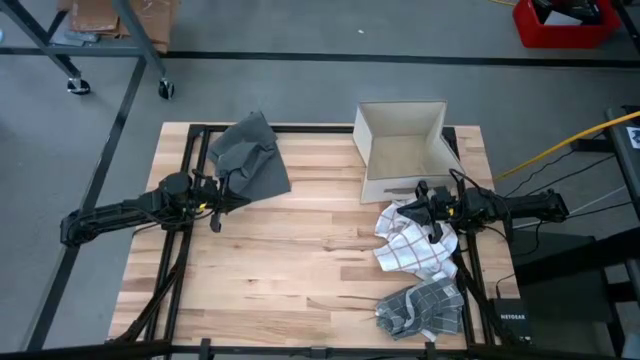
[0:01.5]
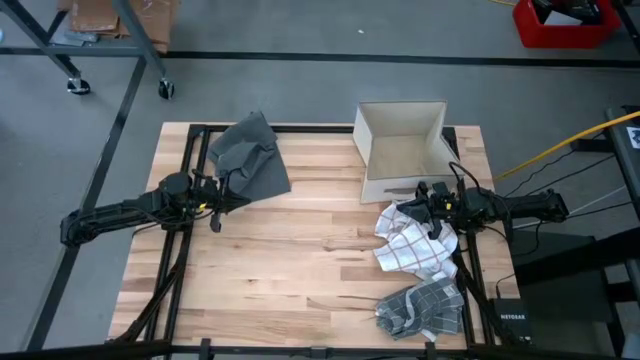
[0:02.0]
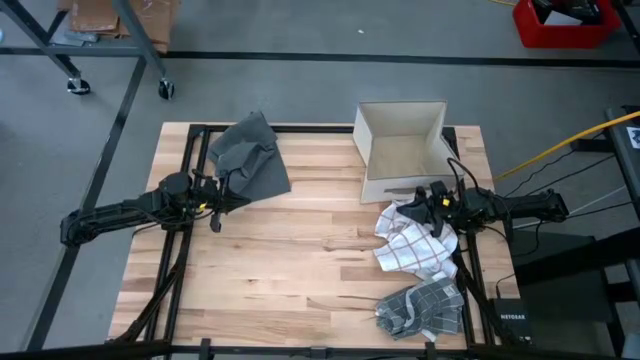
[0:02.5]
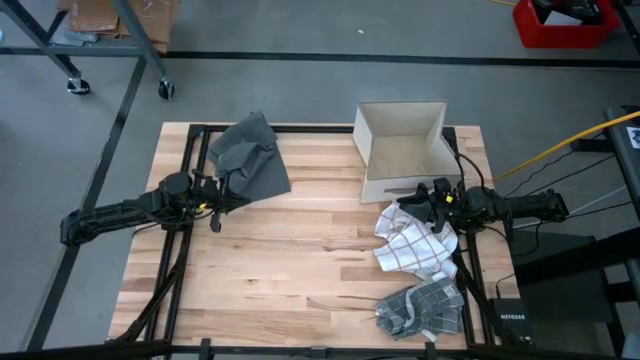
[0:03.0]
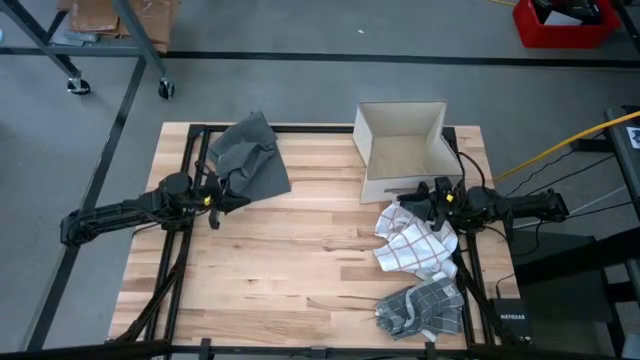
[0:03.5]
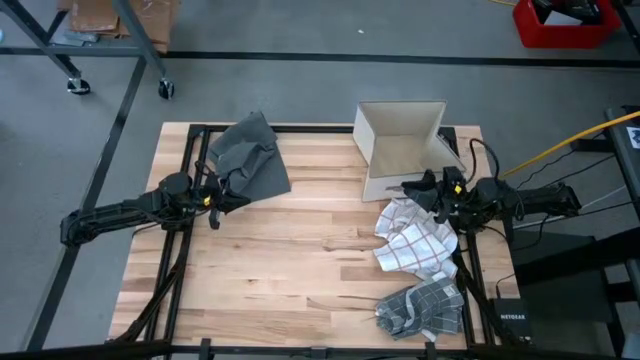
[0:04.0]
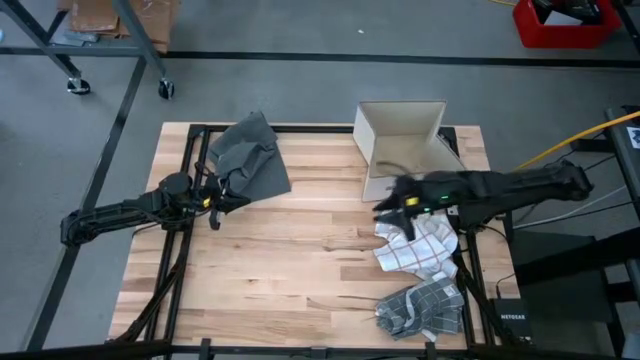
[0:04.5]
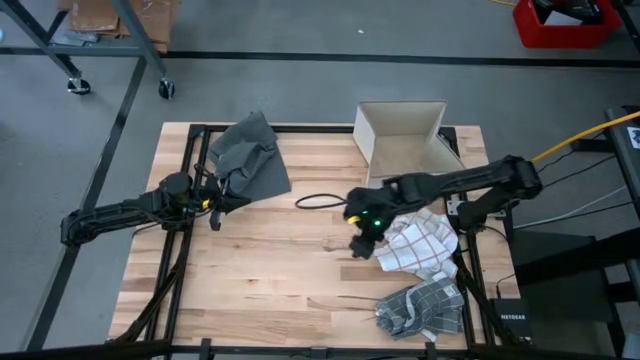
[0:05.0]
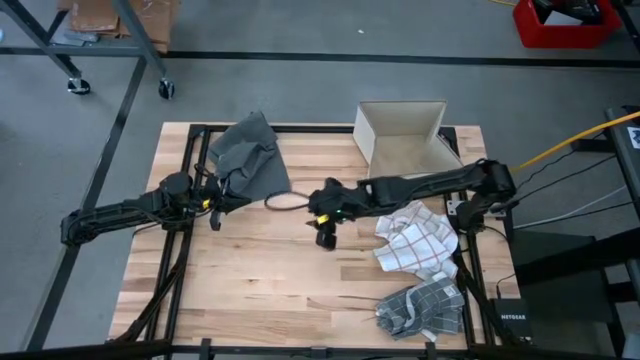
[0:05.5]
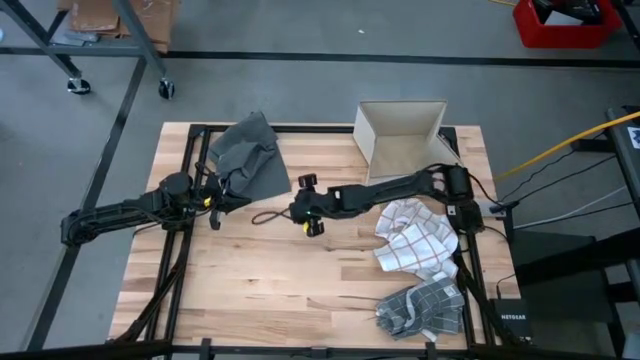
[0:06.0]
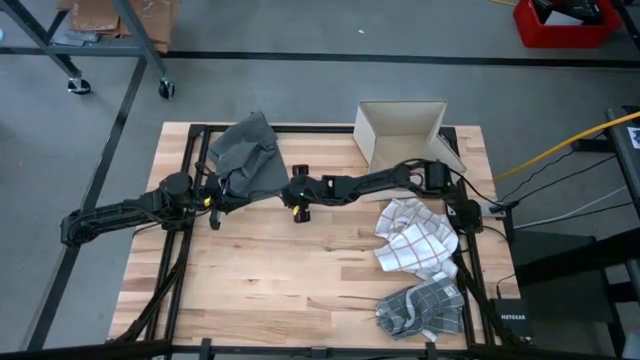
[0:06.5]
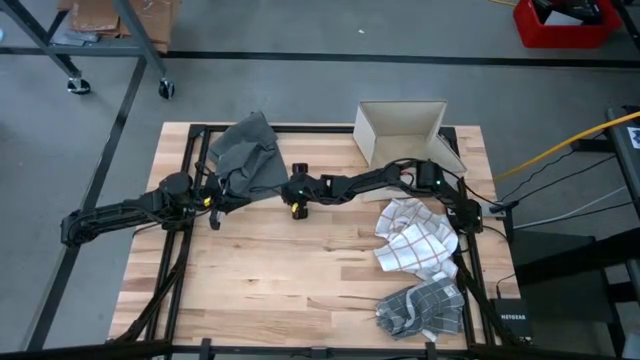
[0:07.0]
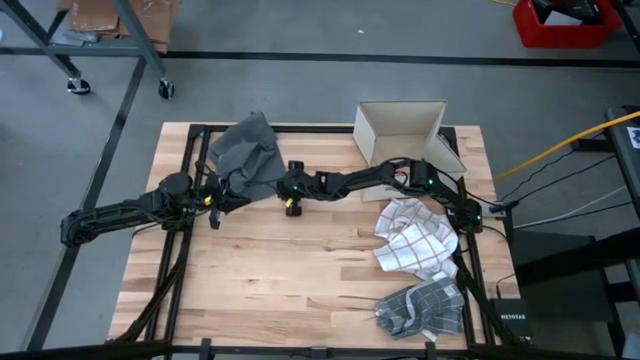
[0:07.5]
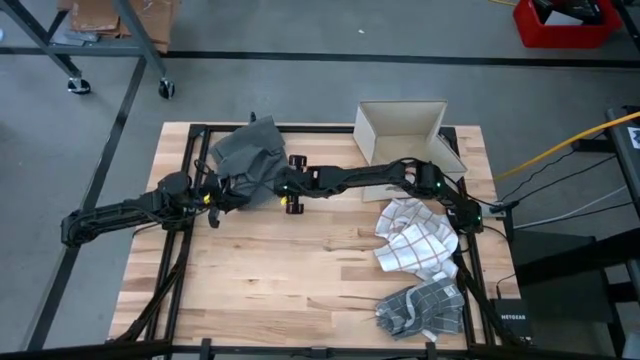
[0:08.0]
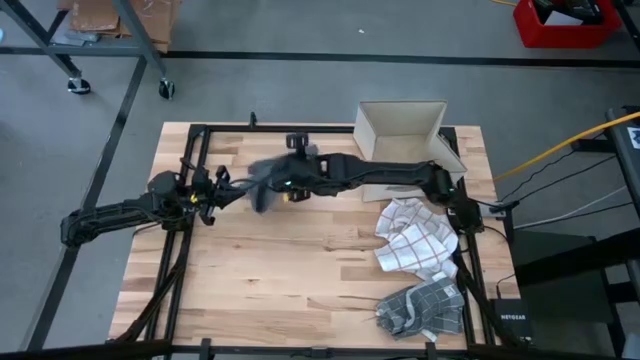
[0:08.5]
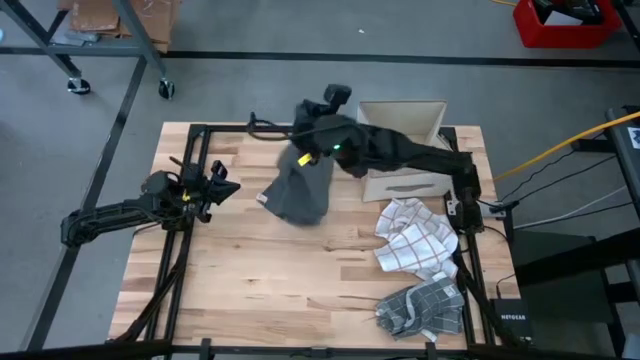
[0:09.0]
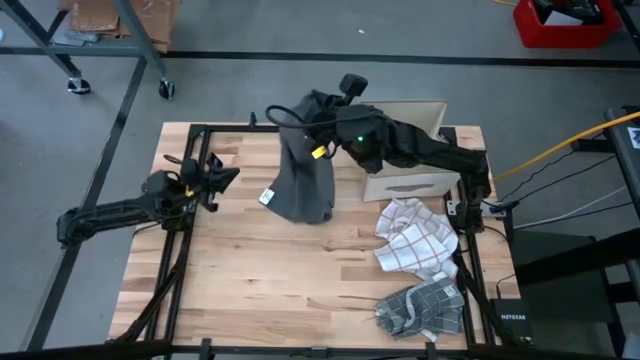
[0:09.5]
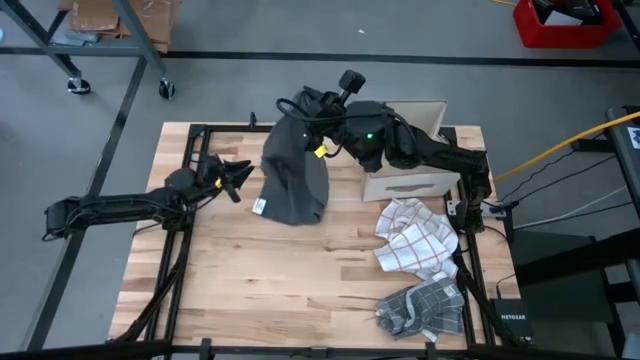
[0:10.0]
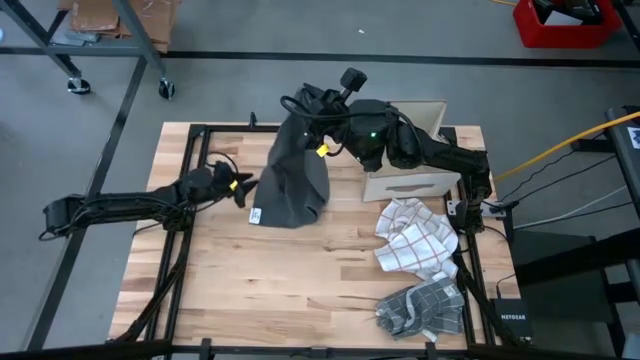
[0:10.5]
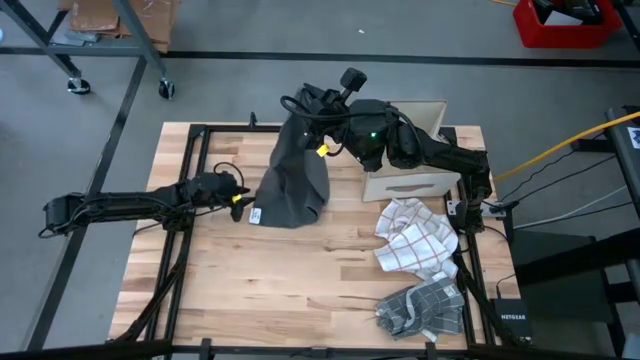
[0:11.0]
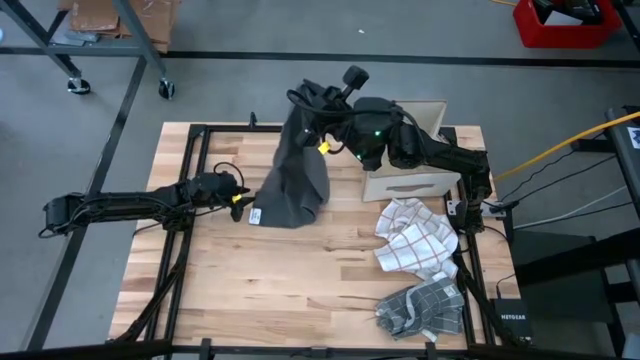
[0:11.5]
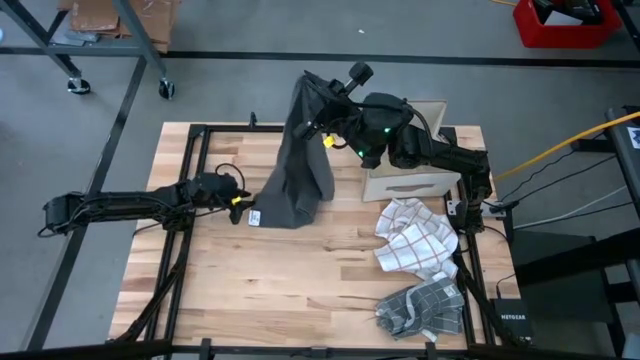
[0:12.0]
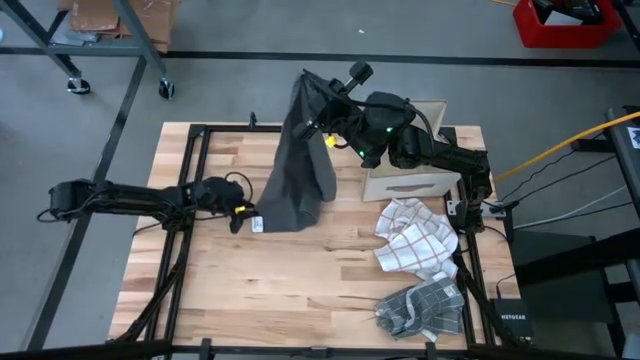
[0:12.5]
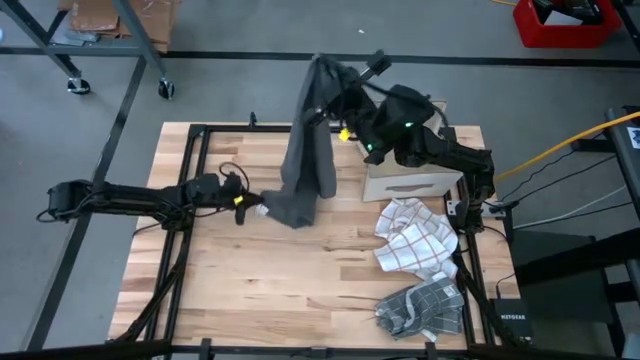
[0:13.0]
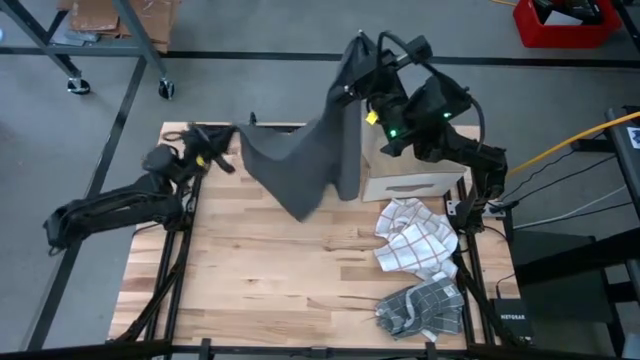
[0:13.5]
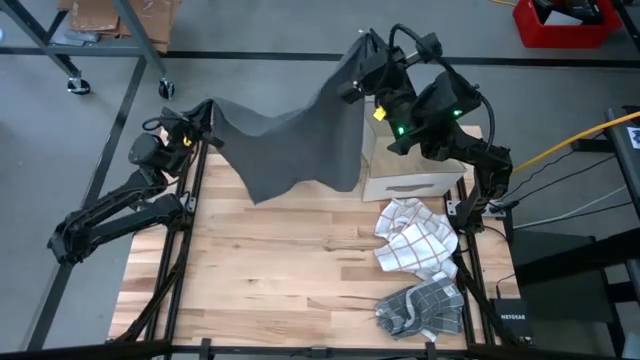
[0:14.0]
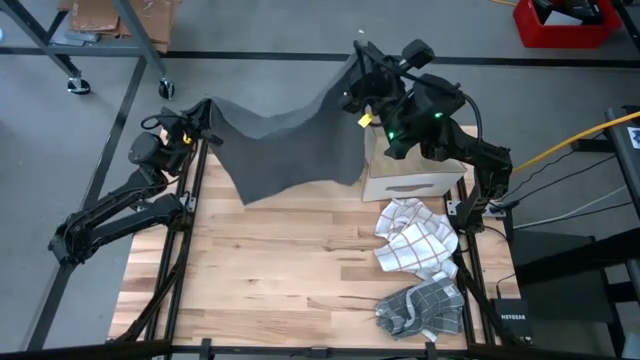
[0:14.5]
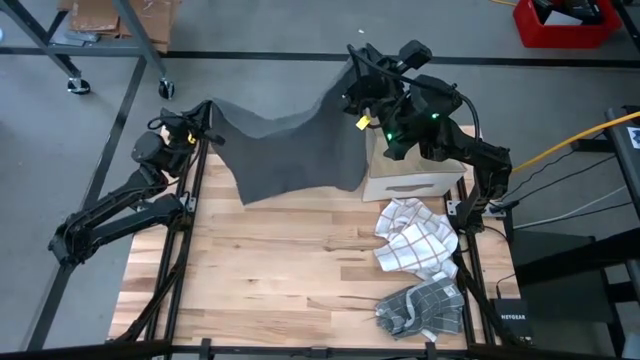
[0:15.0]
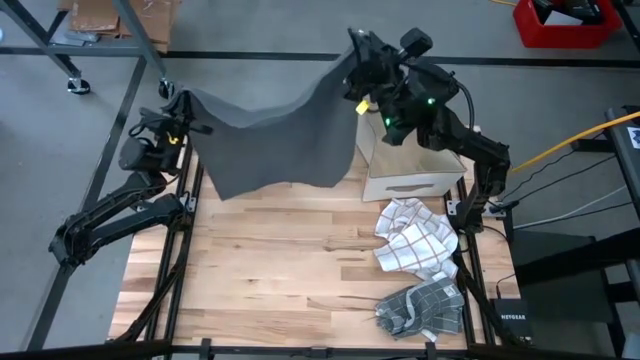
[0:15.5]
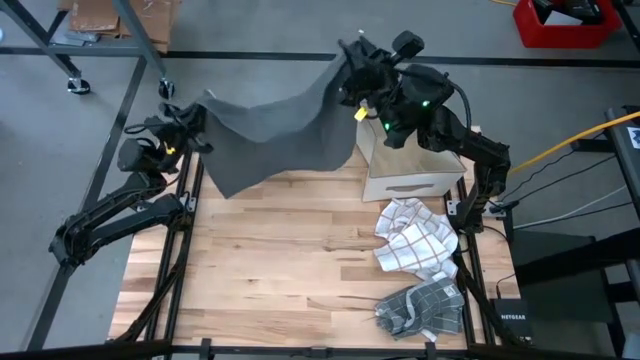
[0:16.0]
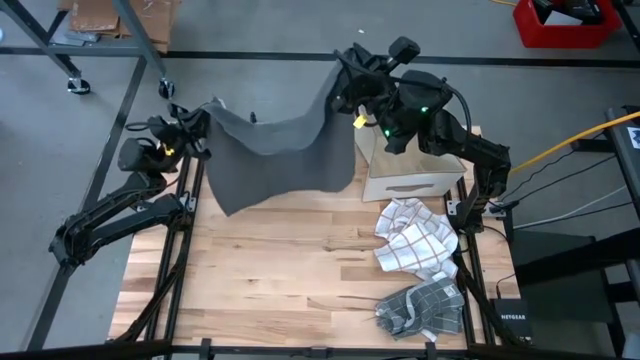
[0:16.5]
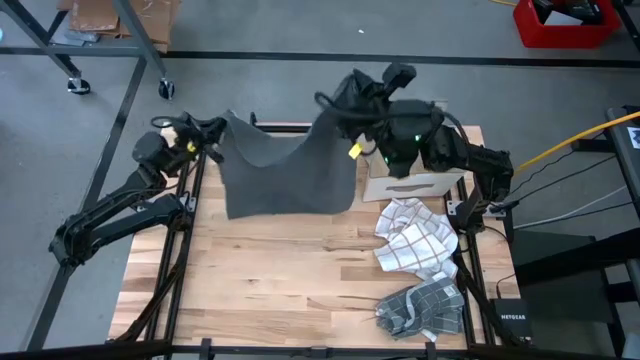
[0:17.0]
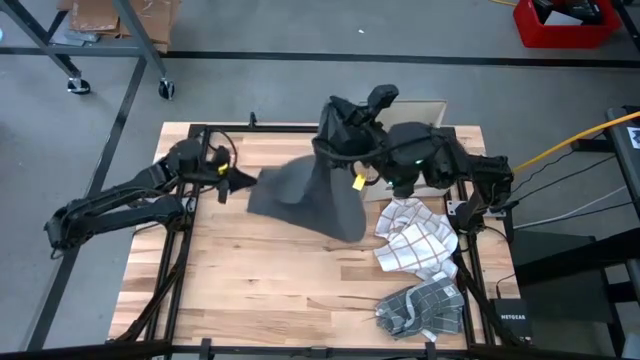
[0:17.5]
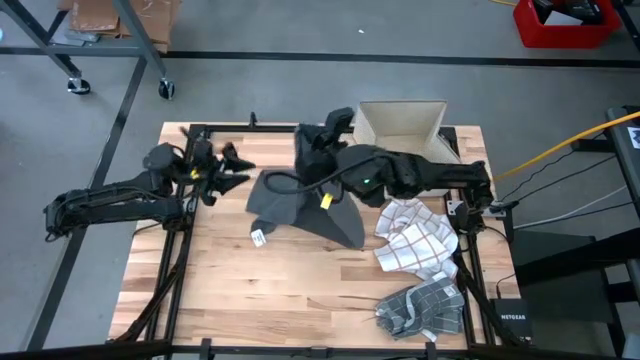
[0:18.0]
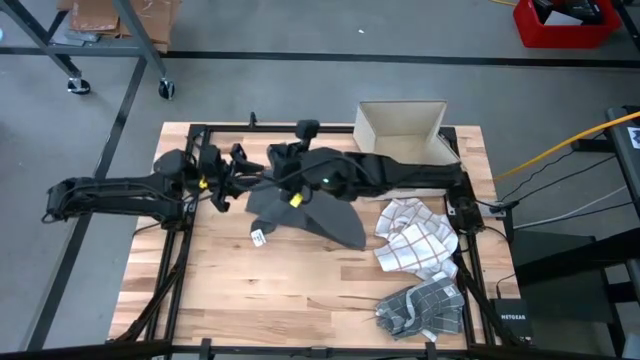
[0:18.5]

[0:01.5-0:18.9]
Task: Fold towel
Fold the gray kitchen towel
